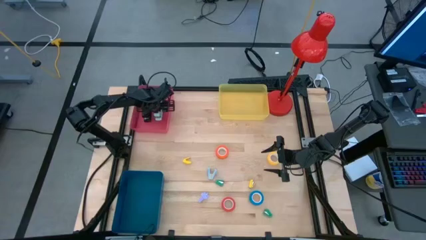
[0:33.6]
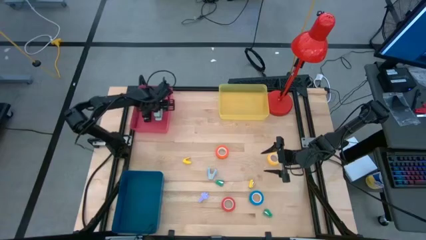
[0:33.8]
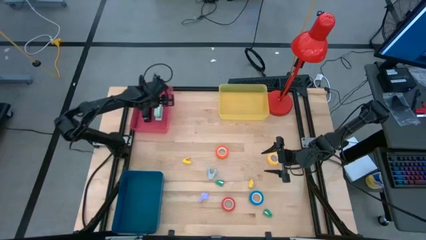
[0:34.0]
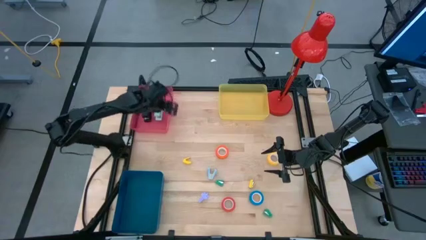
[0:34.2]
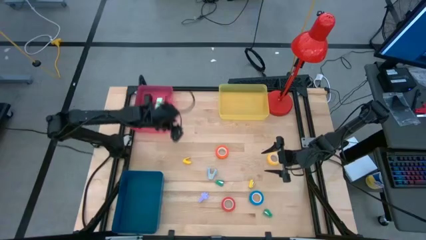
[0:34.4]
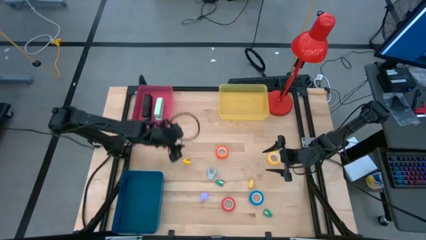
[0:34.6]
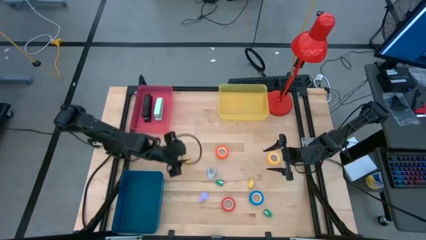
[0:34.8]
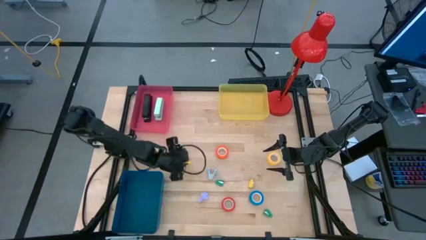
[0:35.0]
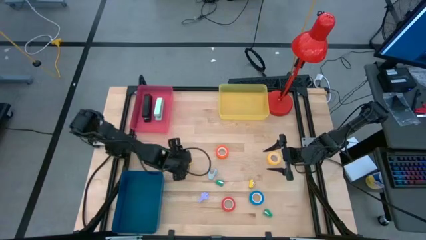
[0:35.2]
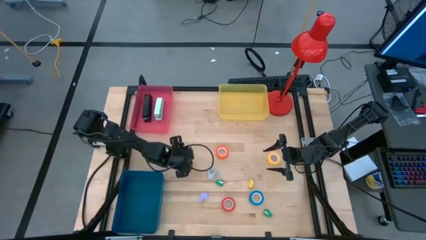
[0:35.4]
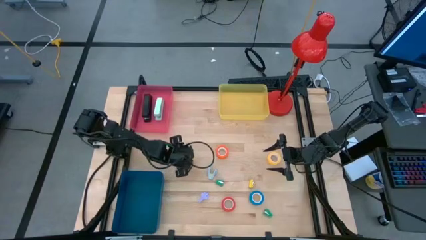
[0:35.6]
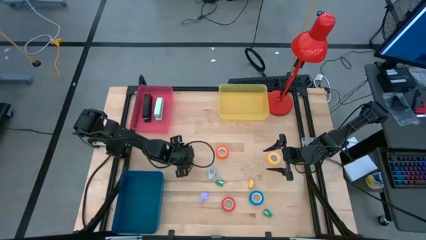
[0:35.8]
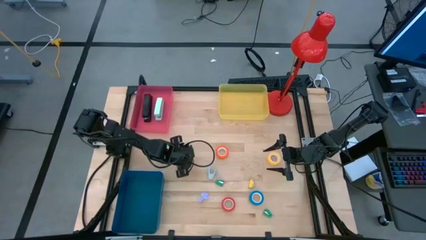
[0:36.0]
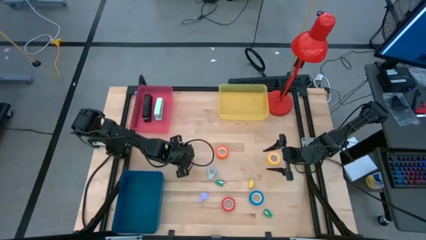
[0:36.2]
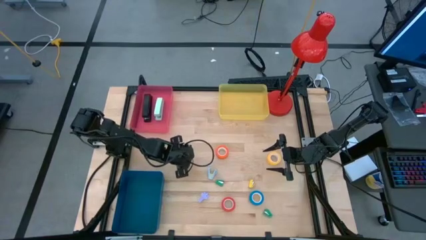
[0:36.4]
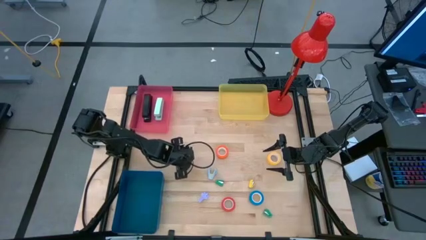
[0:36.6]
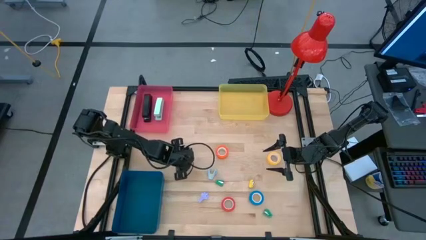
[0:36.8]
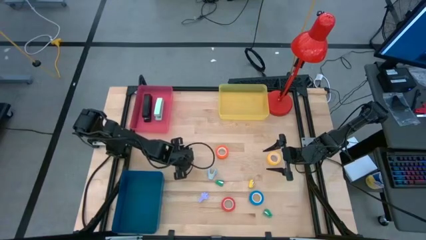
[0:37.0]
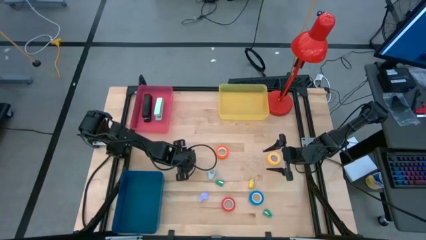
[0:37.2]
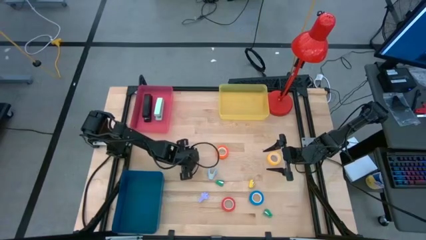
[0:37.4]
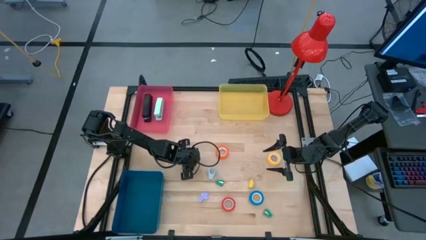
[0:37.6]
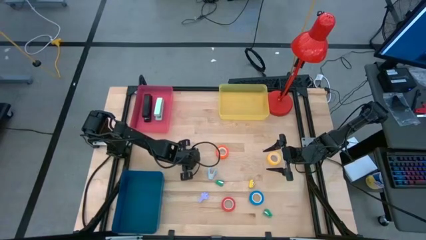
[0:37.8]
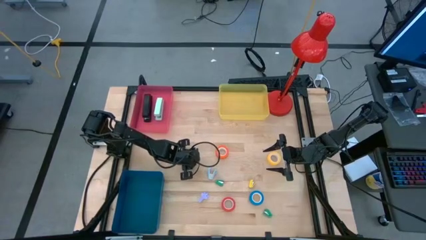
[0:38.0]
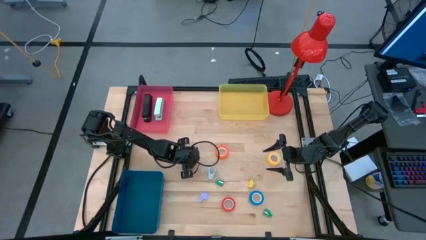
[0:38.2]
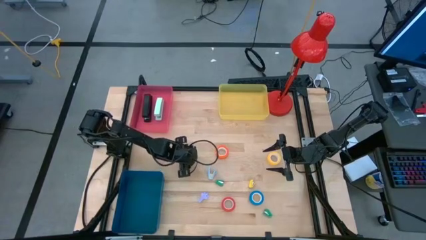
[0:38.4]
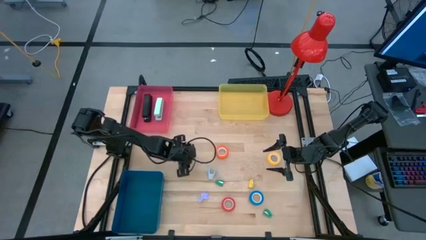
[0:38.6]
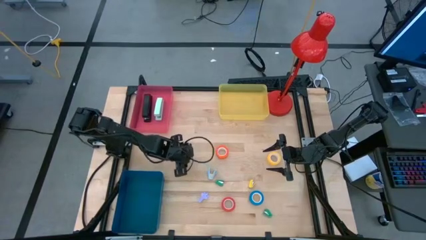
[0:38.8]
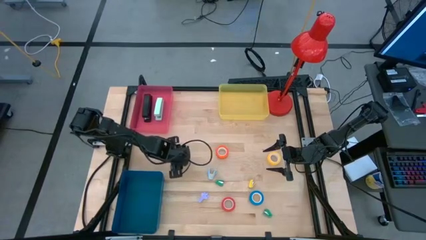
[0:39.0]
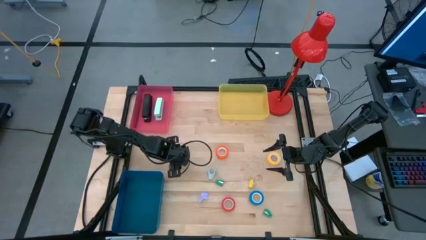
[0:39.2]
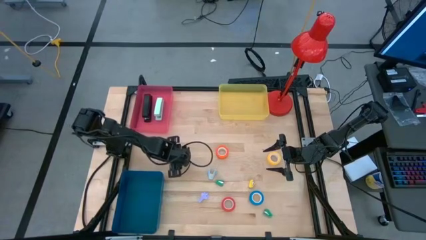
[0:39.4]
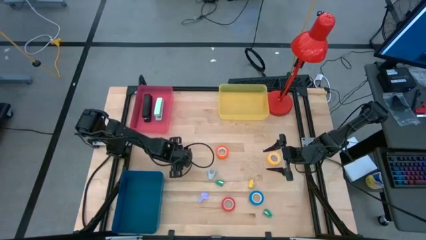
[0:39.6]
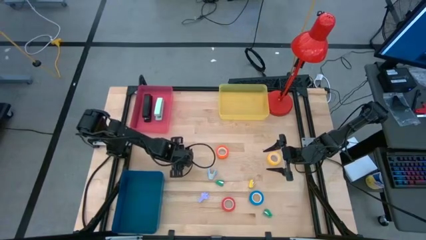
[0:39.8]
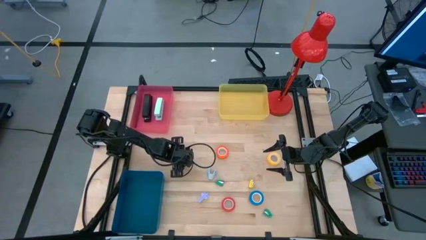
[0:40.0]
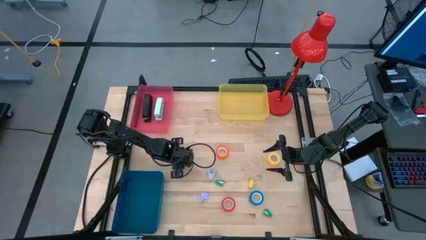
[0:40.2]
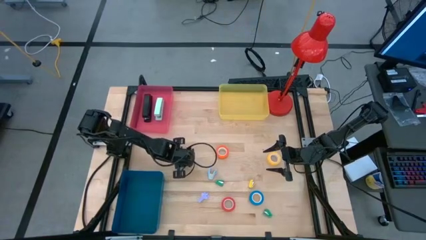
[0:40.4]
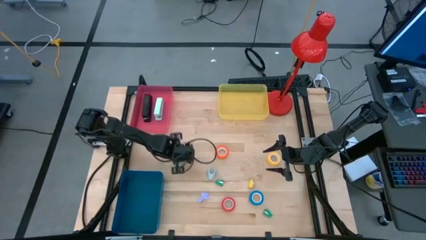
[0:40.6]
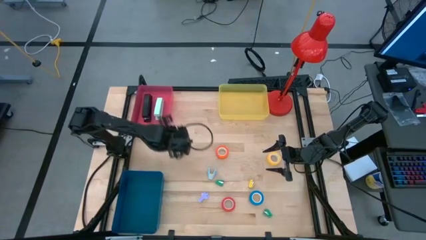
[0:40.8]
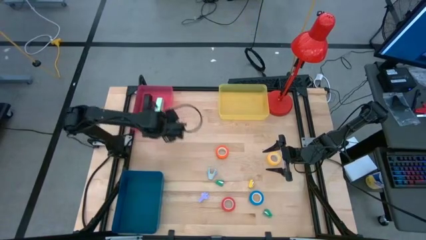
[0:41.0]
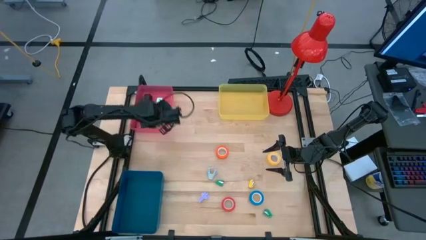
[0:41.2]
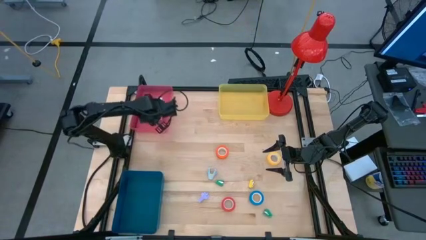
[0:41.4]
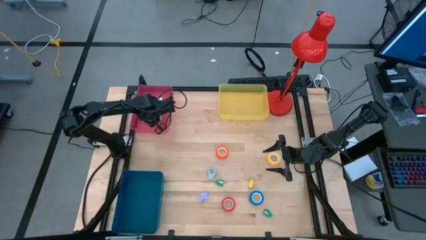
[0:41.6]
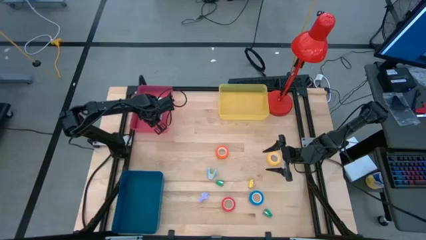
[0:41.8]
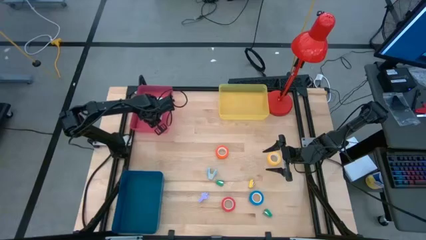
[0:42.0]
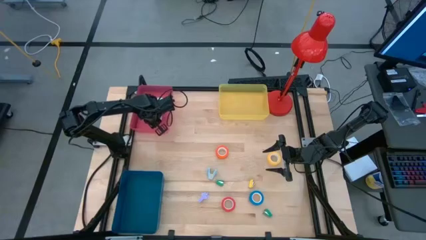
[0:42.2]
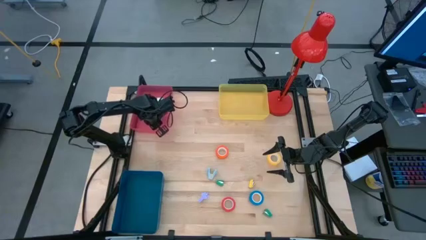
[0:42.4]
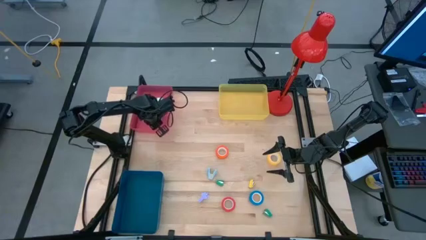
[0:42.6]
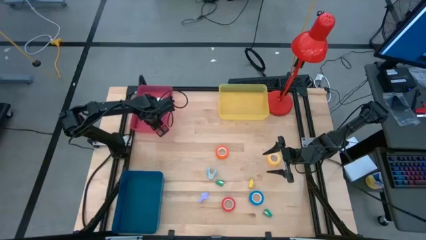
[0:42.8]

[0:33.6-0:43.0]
Task: Pick and place Stapler, Stapler remover, tape
Put the left yellow stapler into the pink bin

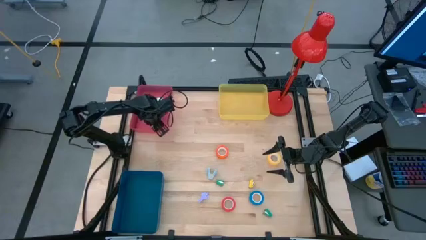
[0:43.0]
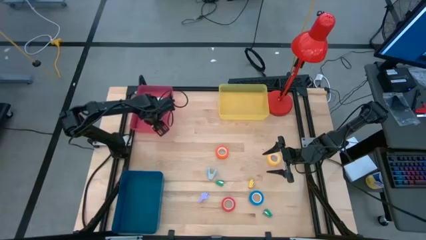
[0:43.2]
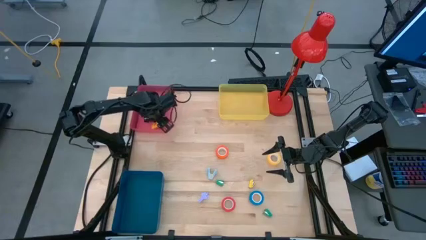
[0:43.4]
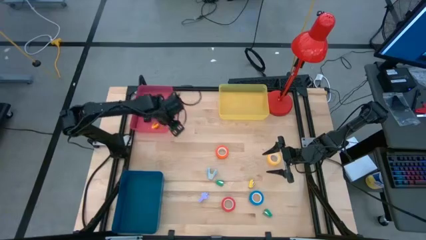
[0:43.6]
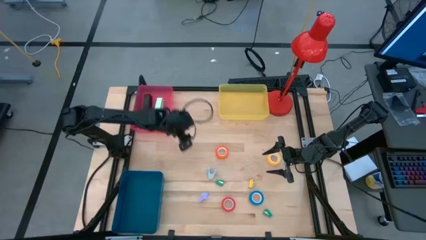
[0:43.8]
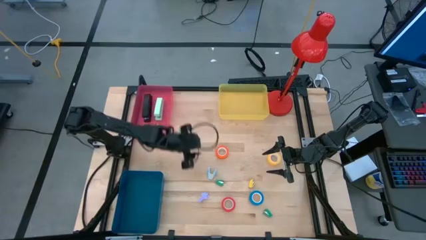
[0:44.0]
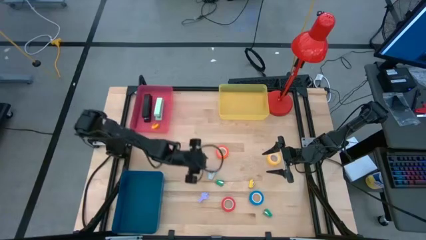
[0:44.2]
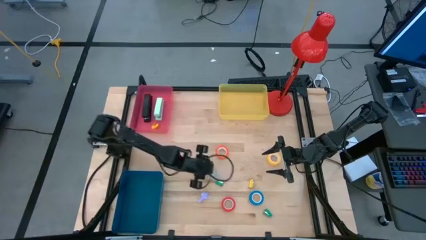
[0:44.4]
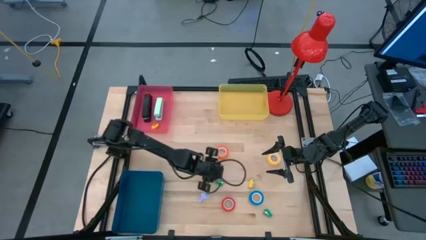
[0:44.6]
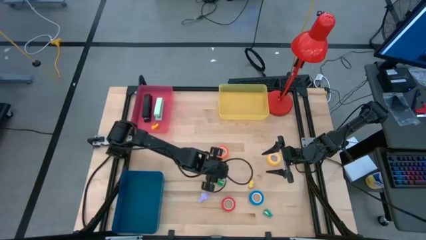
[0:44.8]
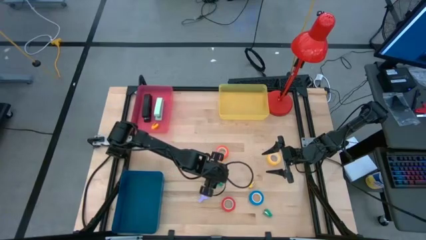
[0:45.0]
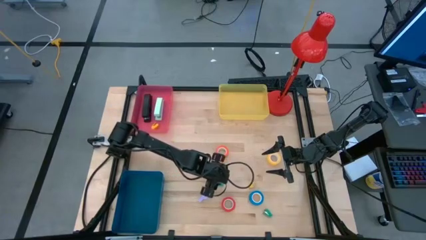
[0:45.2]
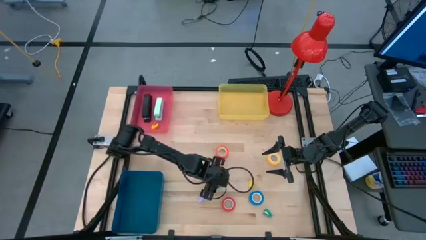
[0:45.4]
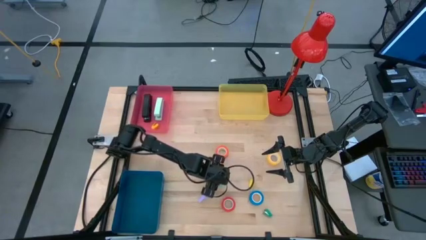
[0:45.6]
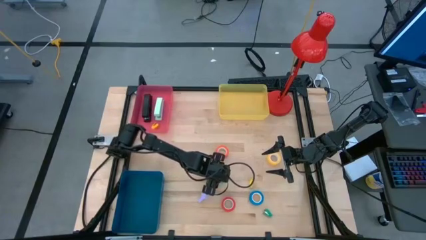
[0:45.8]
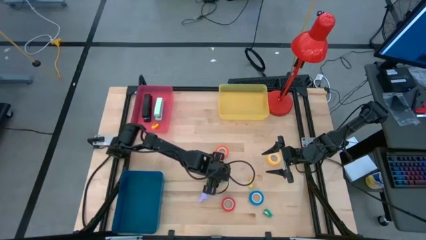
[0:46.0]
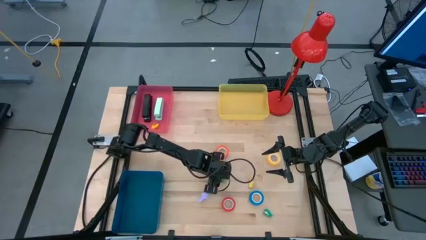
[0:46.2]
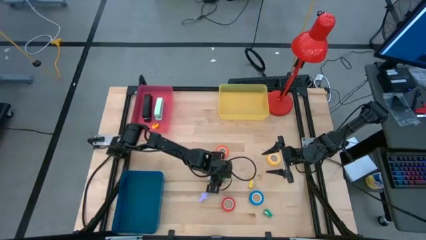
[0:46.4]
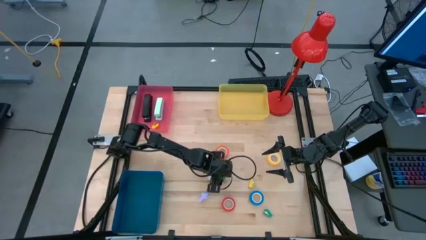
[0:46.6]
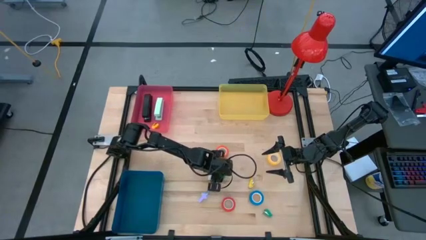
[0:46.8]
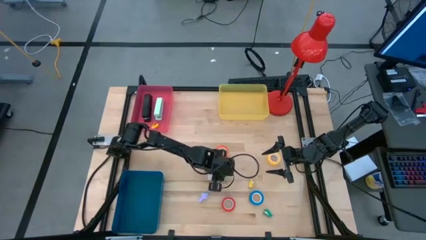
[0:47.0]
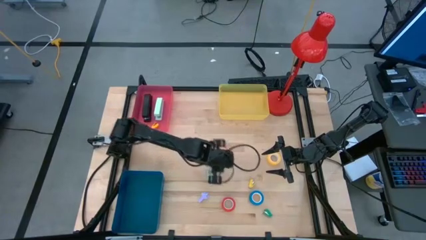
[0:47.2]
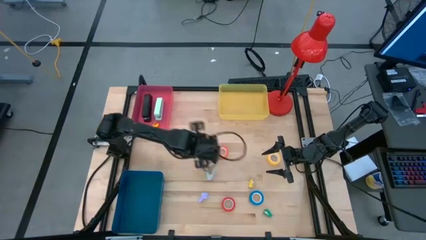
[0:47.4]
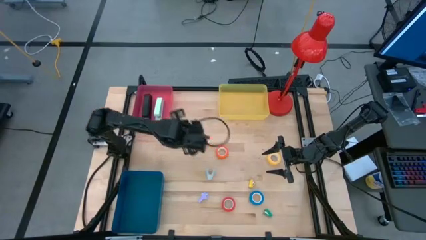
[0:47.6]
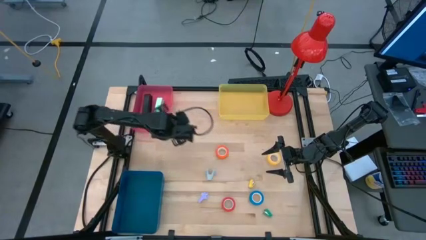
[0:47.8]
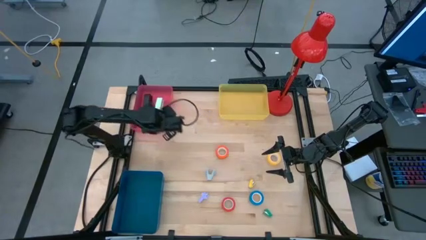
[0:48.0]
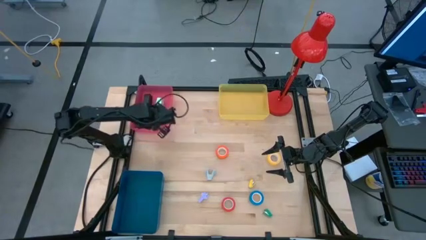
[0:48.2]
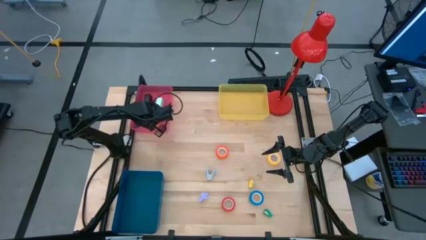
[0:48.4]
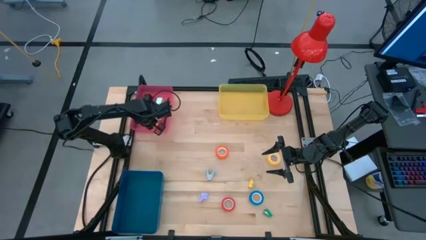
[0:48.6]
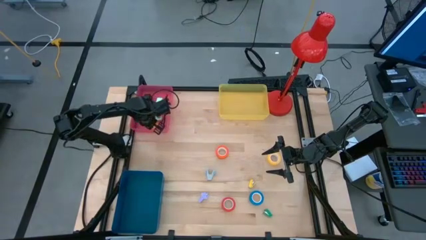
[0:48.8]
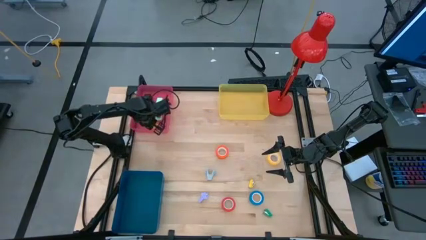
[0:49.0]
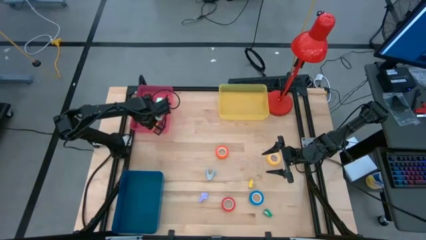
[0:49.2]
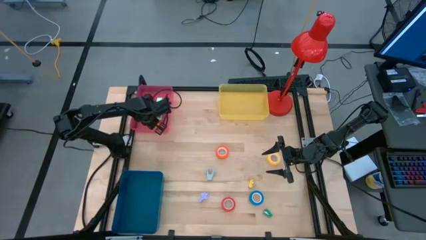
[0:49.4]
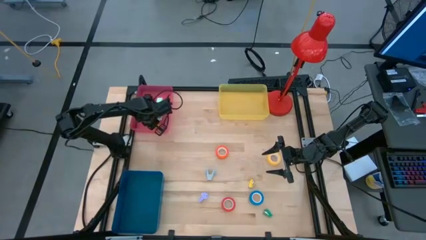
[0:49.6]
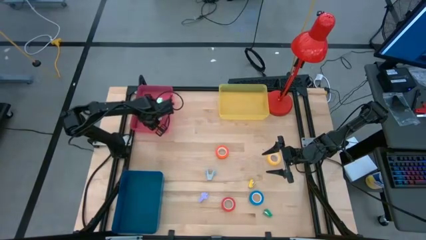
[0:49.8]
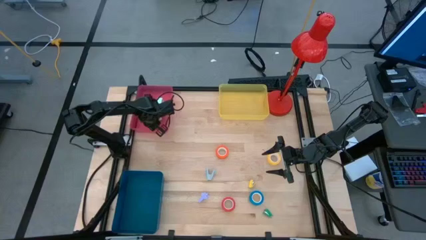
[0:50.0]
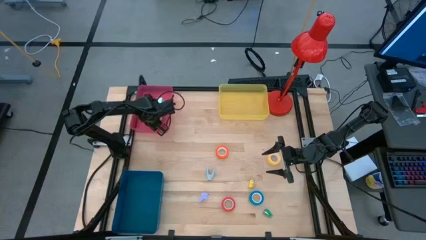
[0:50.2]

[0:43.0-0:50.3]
Put the left green stapler into the pink bin
